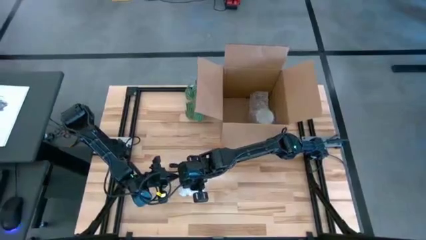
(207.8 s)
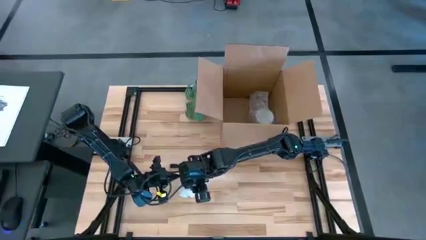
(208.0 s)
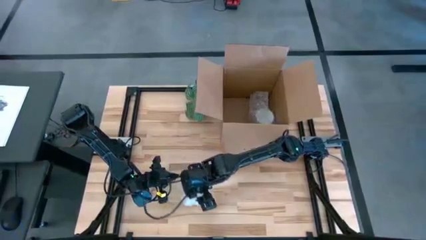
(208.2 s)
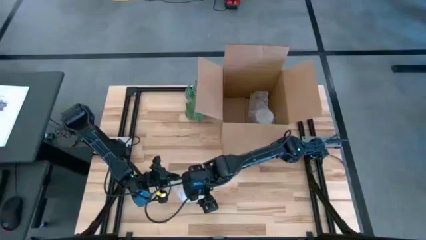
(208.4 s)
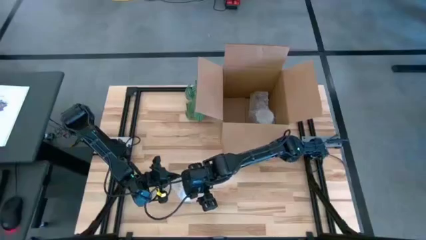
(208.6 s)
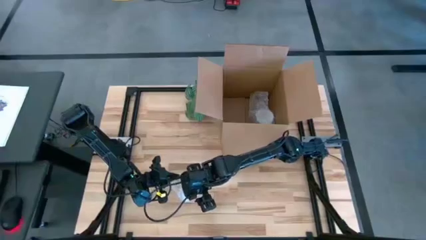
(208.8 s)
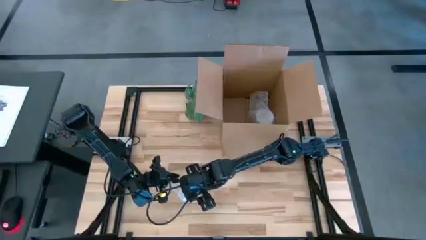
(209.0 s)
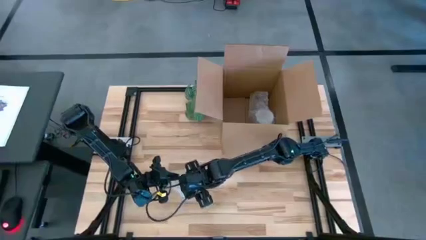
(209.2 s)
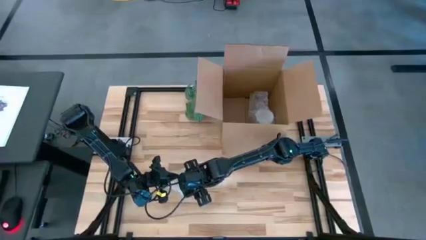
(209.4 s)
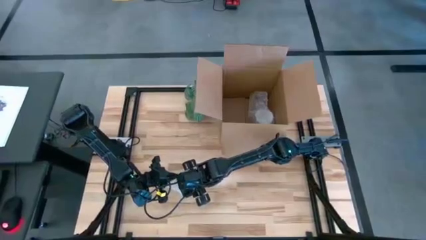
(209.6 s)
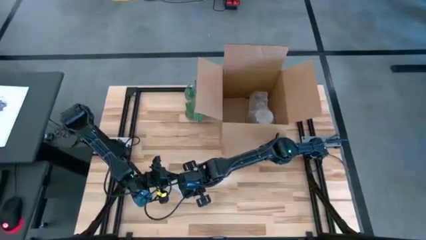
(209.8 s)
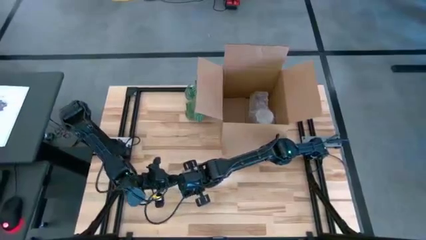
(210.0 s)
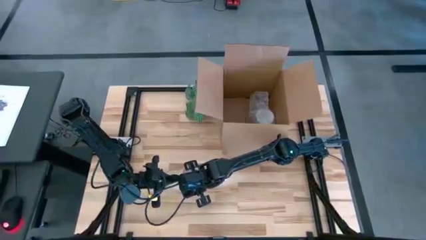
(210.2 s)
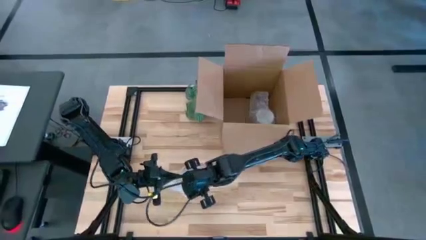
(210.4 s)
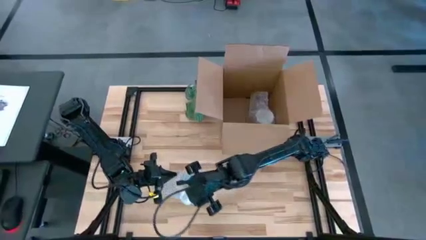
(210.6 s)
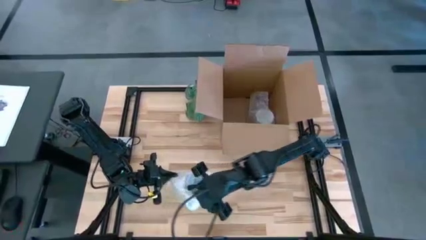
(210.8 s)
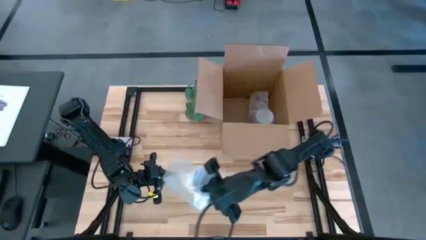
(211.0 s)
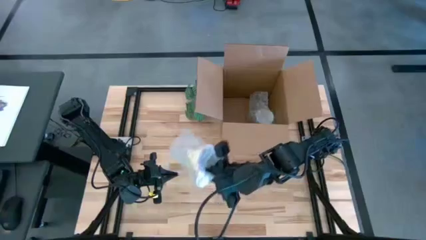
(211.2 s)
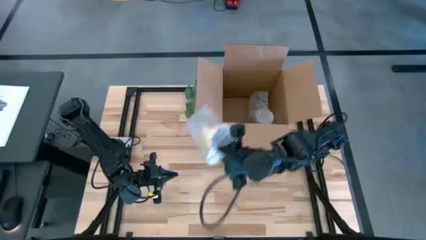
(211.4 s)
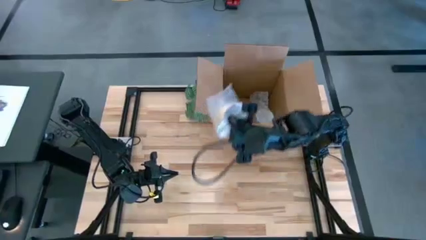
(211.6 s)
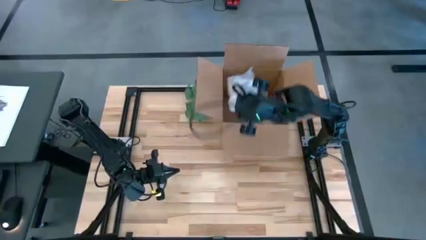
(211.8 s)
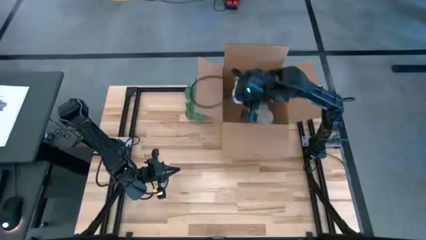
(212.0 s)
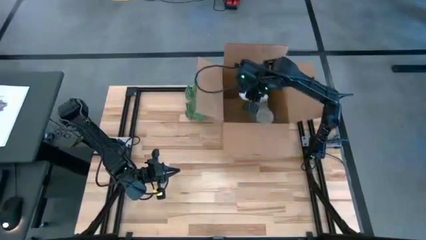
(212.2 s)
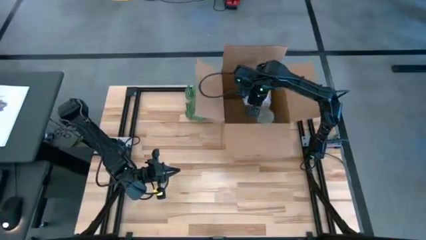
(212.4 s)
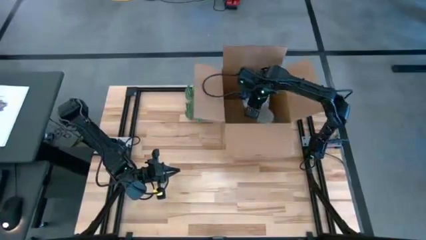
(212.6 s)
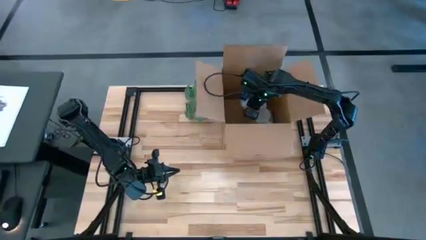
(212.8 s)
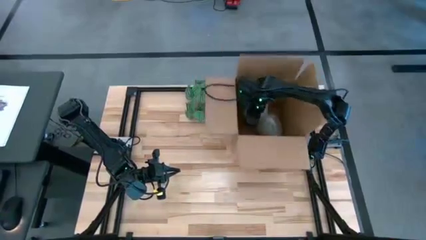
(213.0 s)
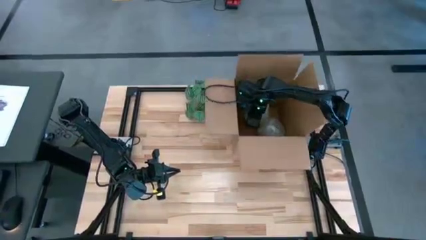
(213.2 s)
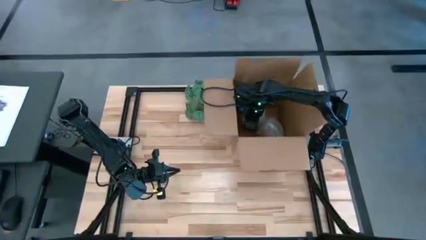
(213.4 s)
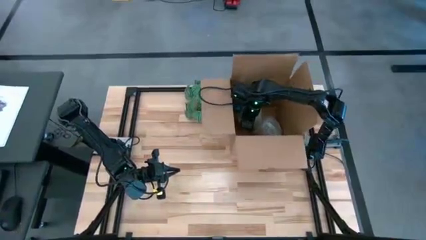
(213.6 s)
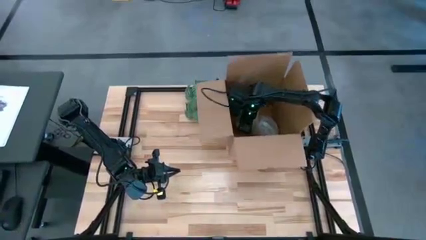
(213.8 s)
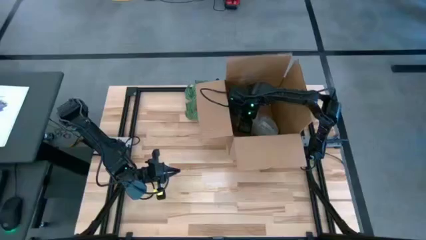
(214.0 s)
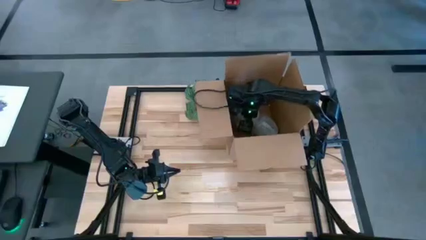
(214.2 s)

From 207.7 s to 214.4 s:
Task: wrap mug
Put the orange wrapped mug into the box

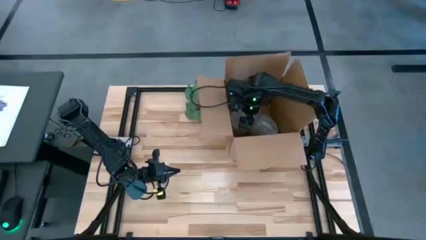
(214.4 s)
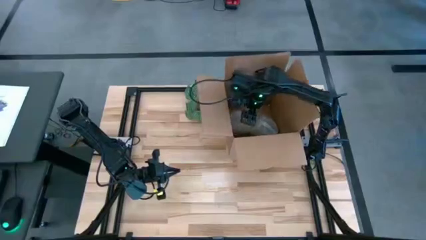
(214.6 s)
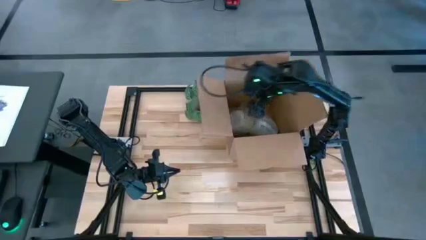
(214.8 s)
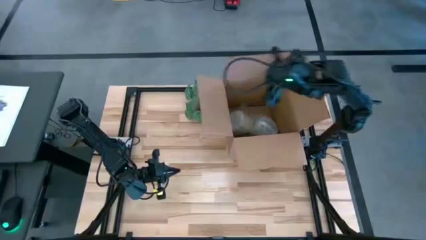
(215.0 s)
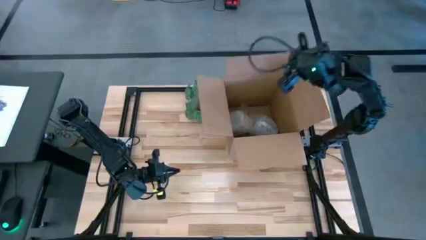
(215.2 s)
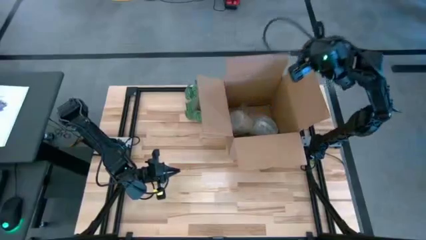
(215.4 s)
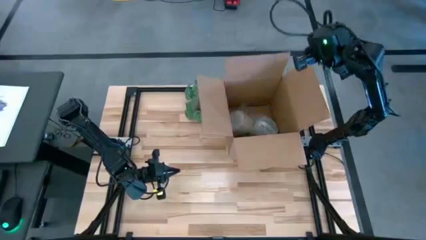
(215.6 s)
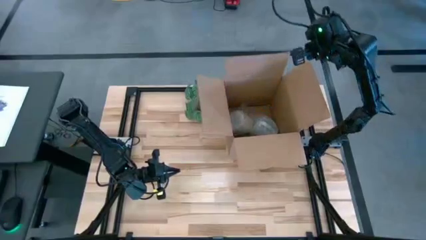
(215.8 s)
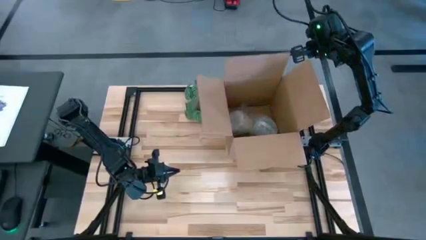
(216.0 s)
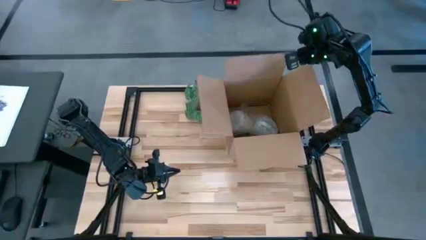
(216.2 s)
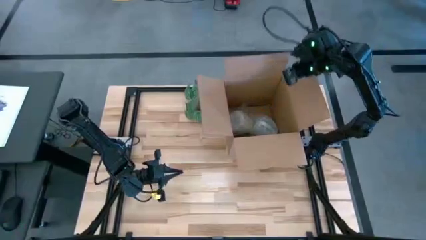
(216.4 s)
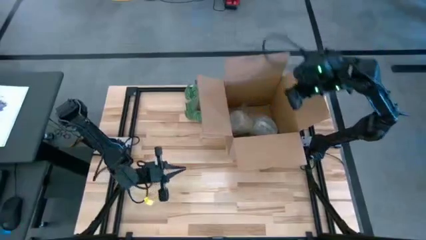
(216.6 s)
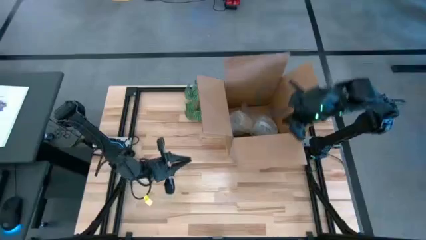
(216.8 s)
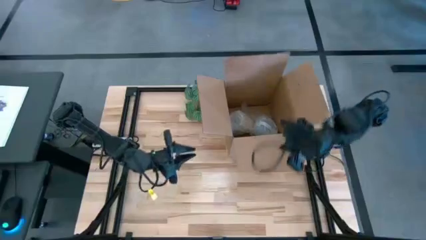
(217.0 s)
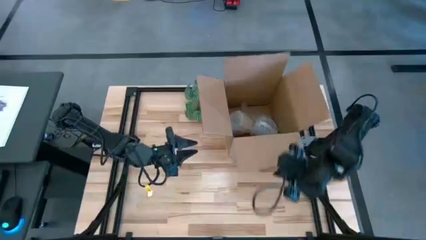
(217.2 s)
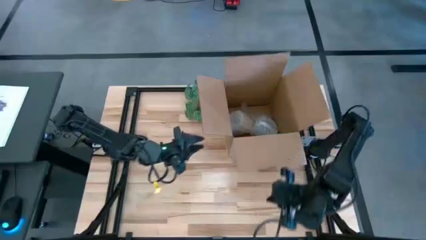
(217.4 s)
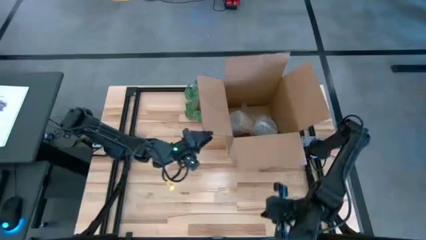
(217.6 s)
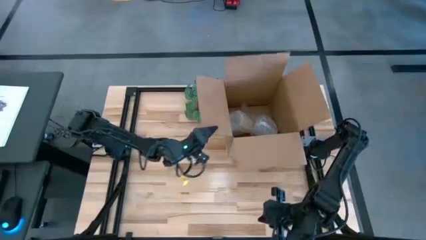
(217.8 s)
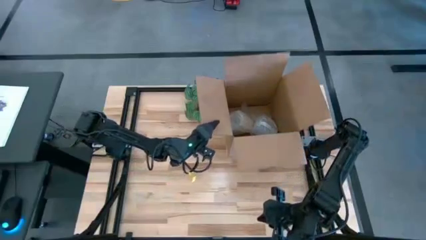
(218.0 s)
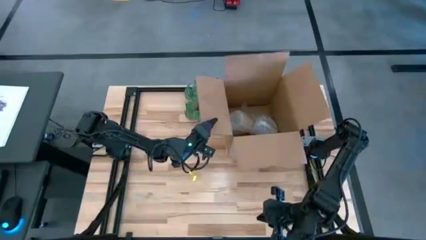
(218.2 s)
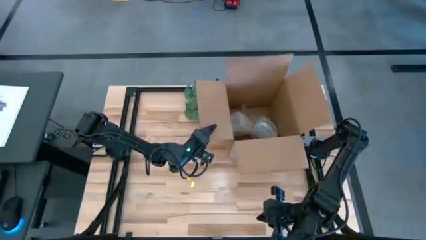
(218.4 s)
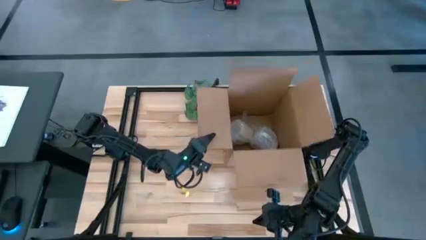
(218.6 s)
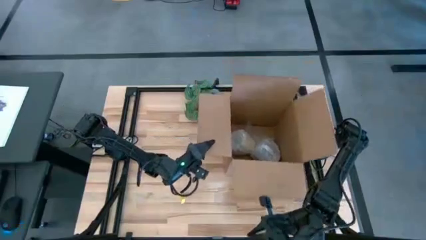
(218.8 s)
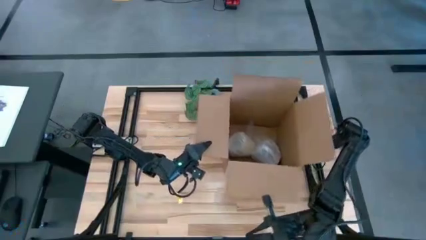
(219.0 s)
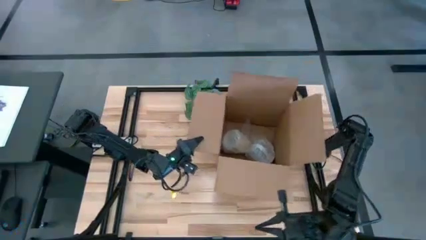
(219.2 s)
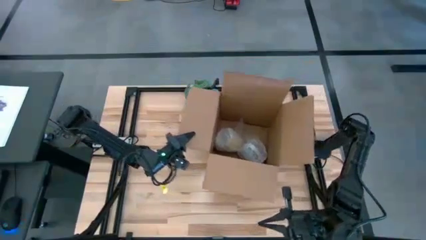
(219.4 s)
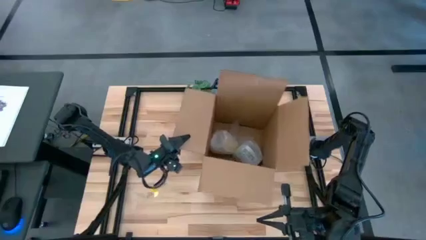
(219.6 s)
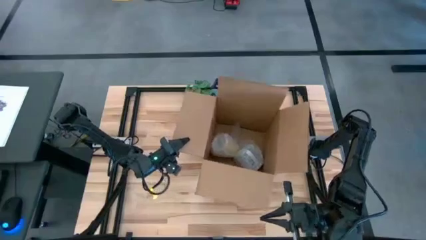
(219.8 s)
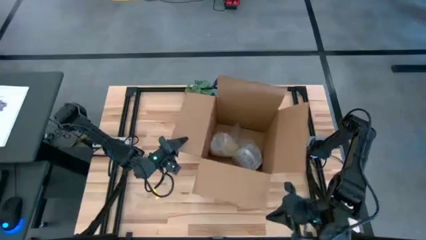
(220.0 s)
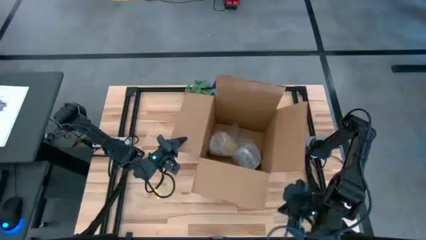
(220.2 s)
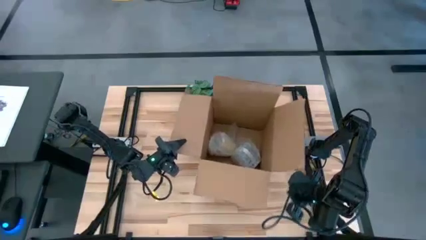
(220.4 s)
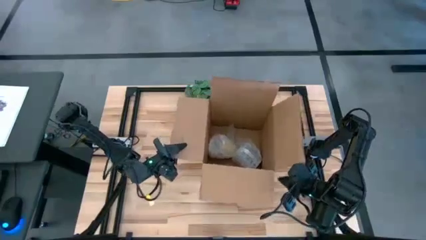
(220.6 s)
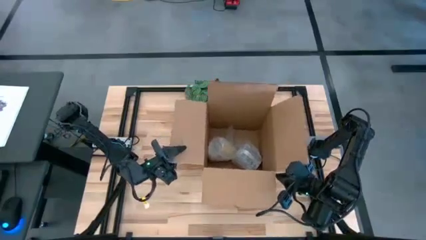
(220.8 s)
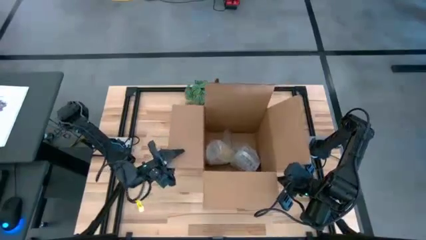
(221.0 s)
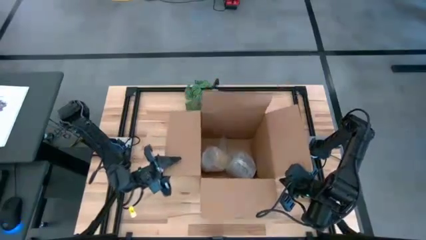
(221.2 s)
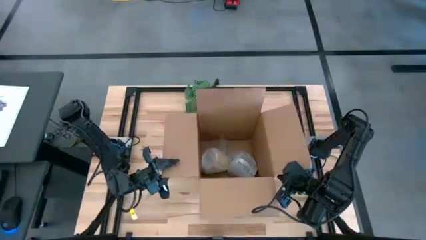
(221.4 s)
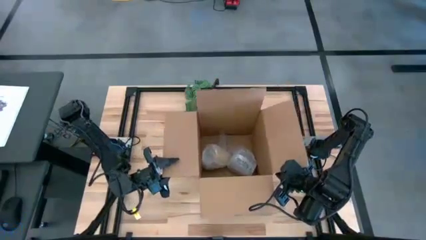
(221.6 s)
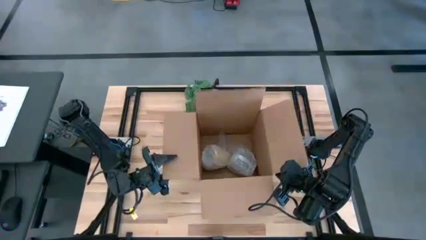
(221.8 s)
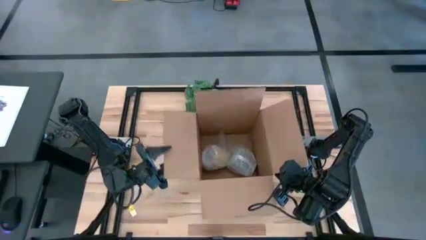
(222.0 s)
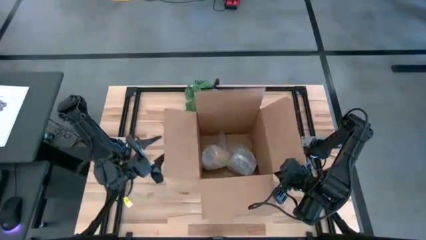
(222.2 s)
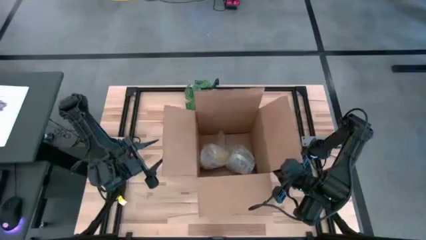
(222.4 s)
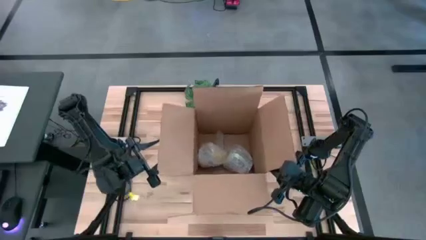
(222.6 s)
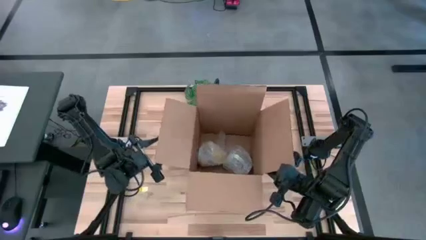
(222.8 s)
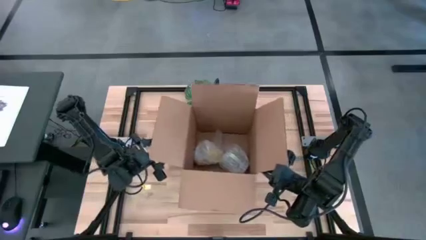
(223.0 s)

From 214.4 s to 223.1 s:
Move the box to the center

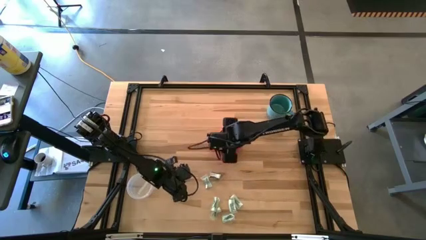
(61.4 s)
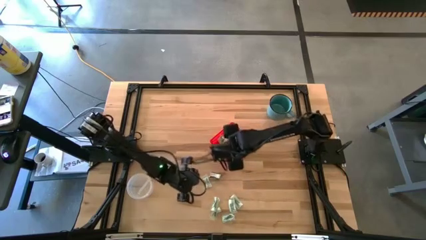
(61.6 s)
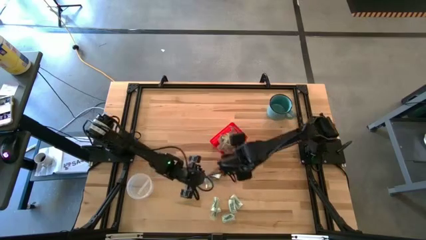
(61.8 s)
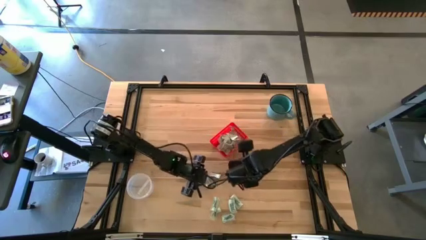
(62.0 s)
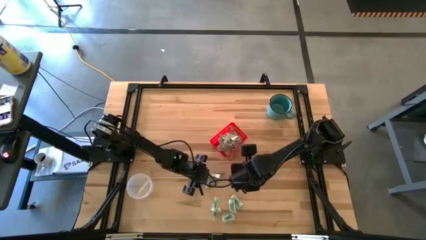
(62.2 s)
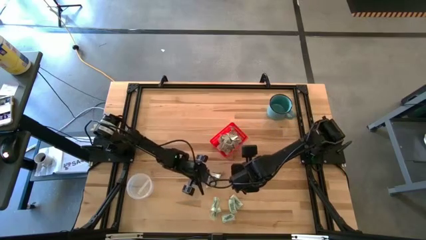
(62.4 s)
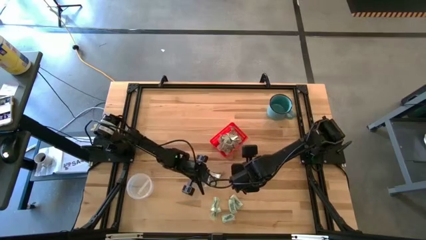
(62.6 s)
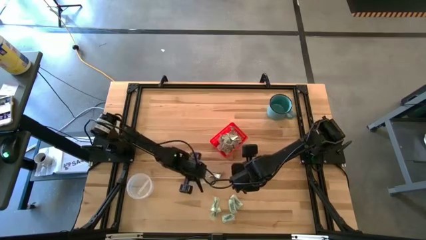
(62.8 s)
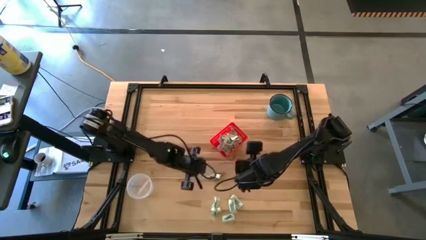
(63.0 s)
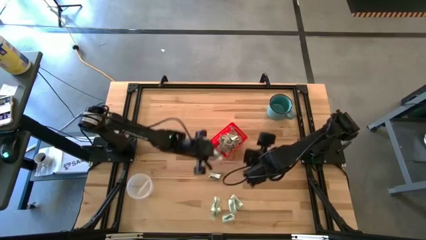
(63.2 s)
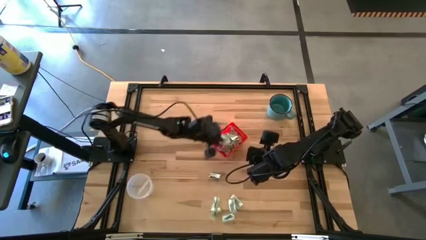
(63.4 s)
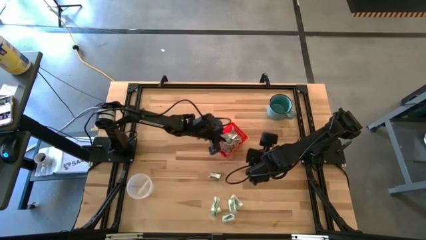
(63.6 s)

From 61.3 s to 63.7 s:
Task: Pick and place items into bin
Put the stevia packet into the red bin
